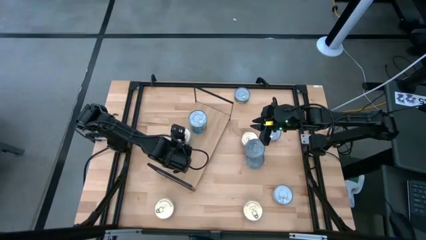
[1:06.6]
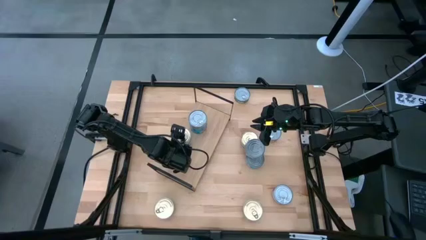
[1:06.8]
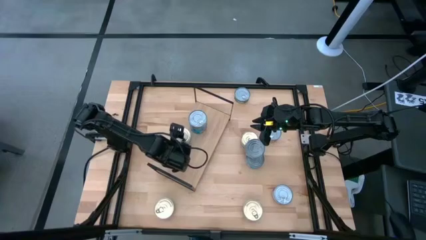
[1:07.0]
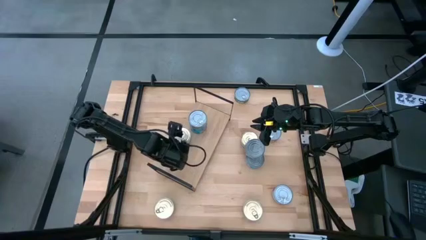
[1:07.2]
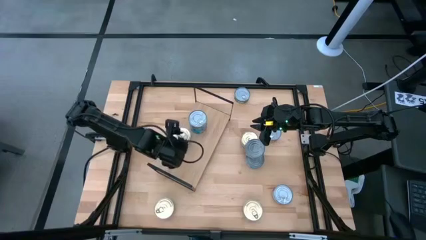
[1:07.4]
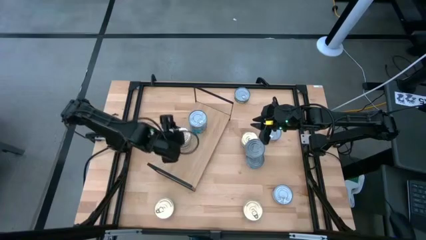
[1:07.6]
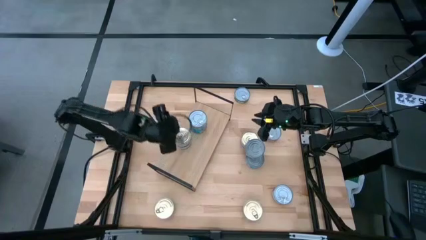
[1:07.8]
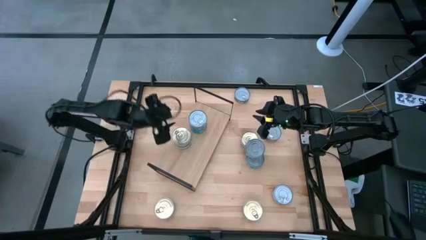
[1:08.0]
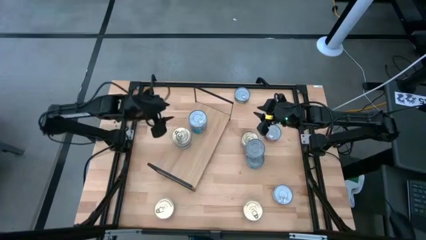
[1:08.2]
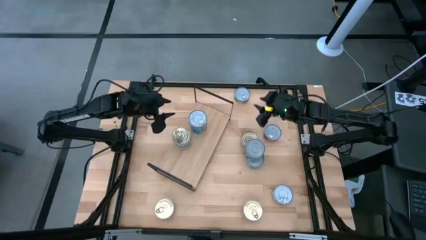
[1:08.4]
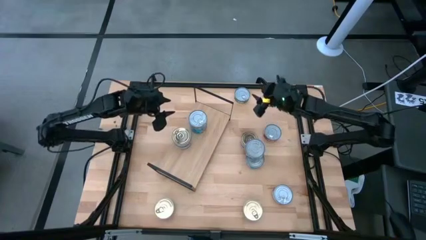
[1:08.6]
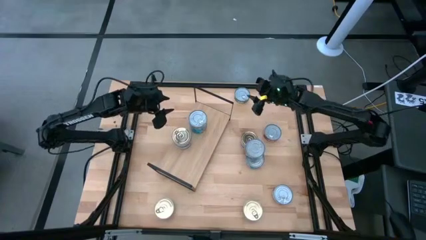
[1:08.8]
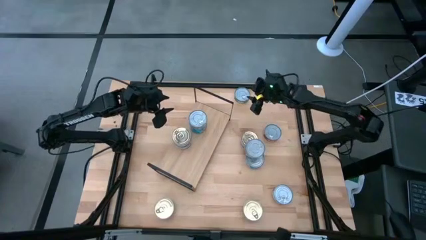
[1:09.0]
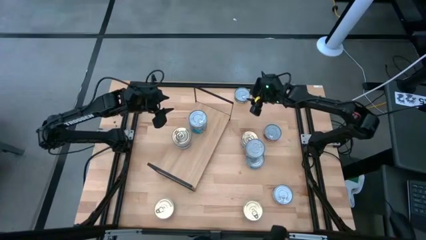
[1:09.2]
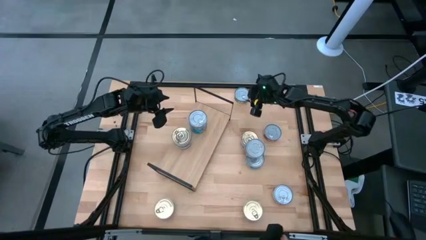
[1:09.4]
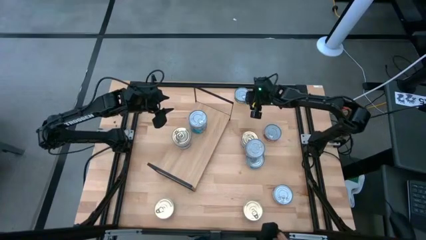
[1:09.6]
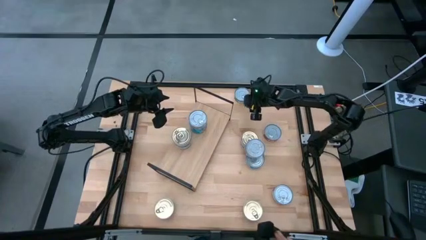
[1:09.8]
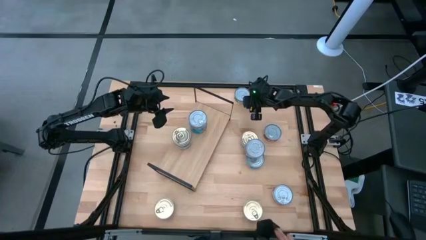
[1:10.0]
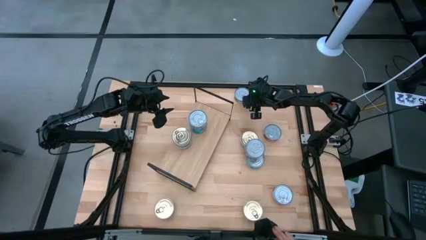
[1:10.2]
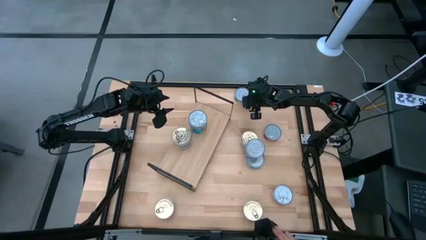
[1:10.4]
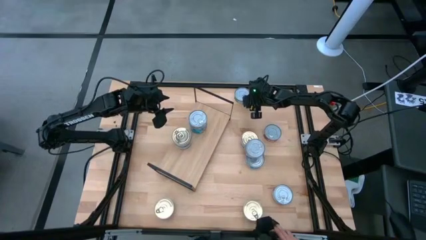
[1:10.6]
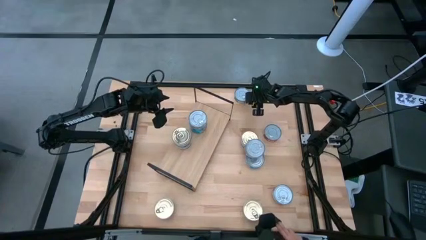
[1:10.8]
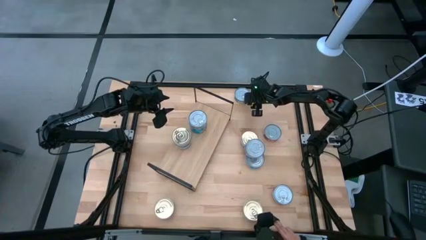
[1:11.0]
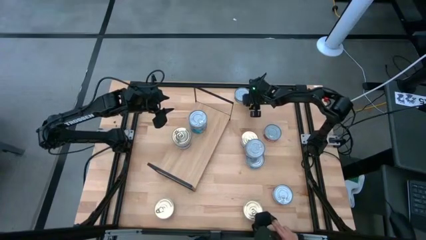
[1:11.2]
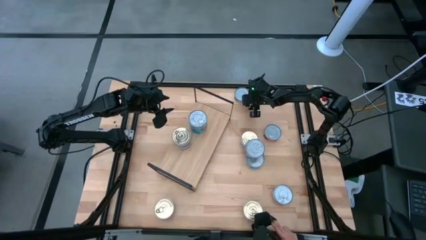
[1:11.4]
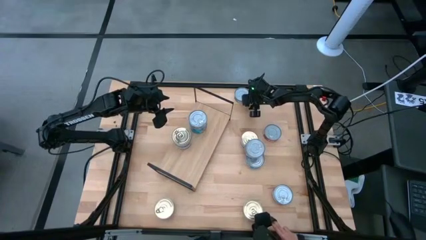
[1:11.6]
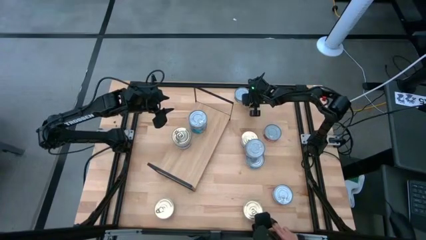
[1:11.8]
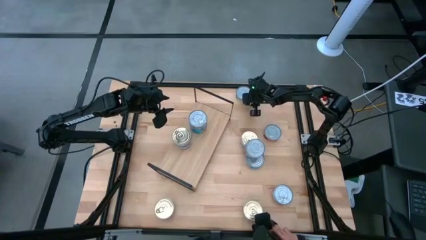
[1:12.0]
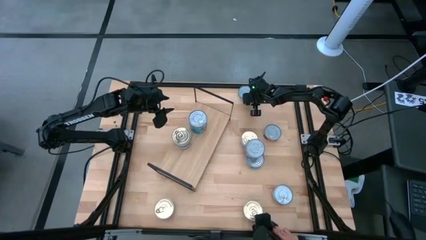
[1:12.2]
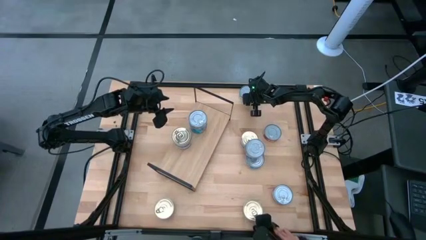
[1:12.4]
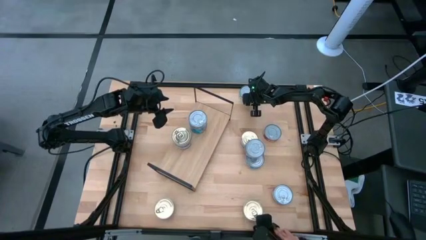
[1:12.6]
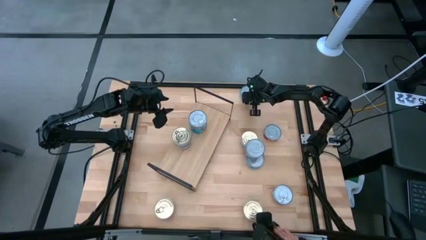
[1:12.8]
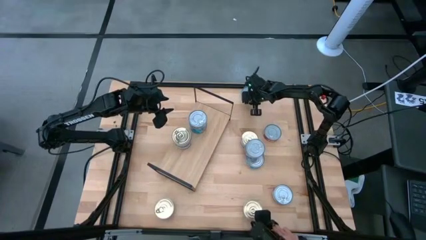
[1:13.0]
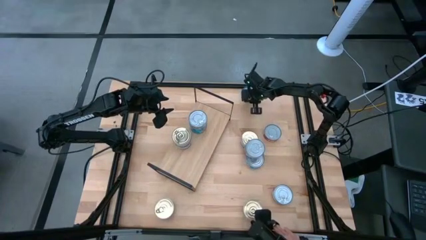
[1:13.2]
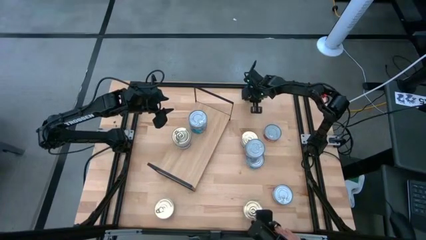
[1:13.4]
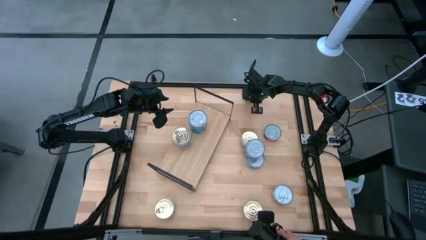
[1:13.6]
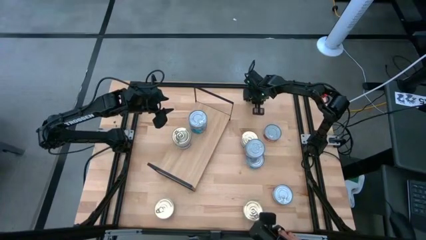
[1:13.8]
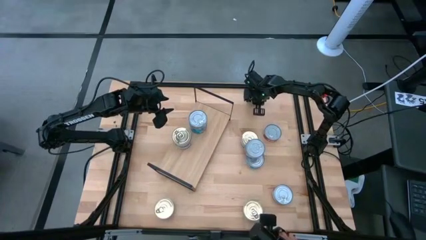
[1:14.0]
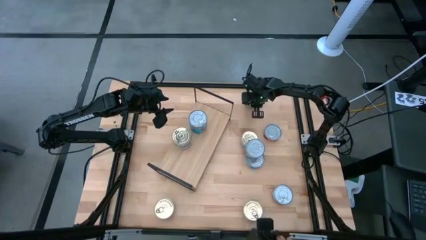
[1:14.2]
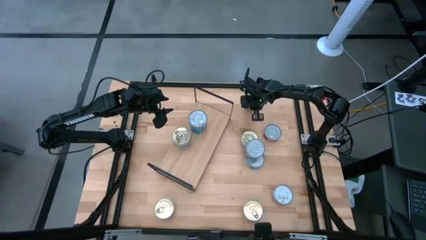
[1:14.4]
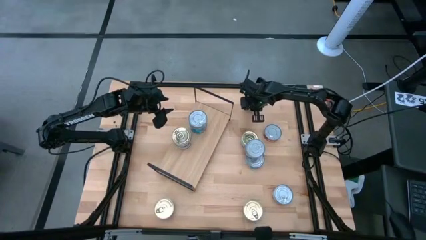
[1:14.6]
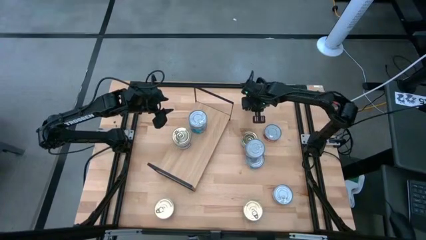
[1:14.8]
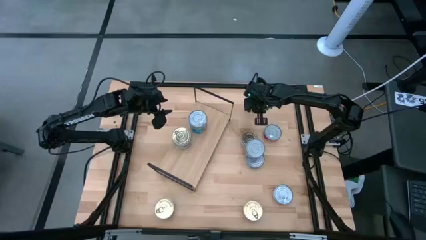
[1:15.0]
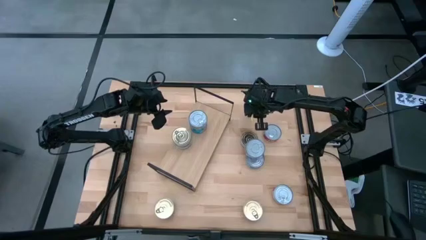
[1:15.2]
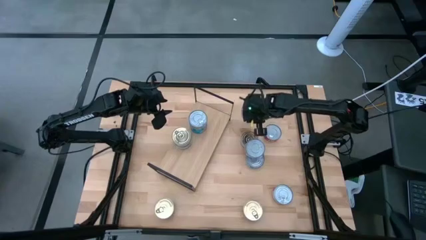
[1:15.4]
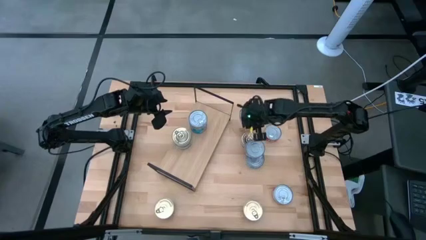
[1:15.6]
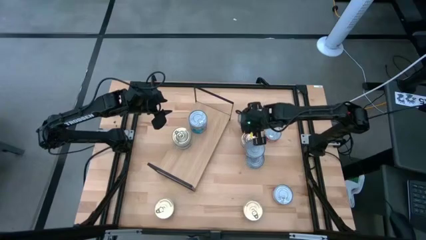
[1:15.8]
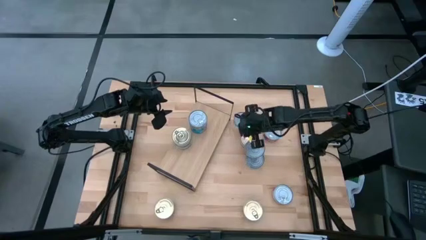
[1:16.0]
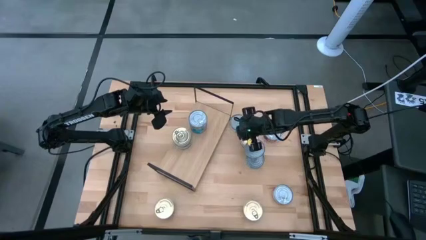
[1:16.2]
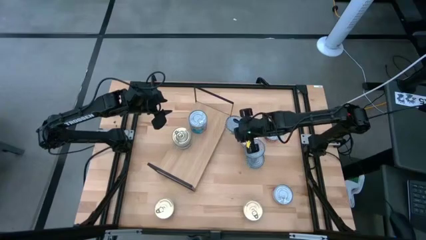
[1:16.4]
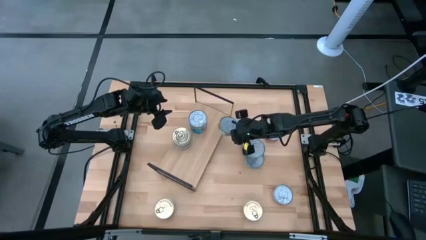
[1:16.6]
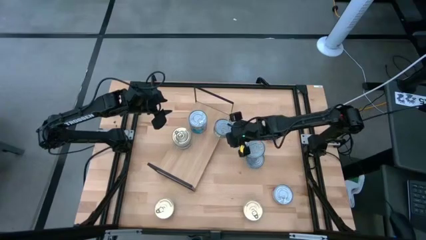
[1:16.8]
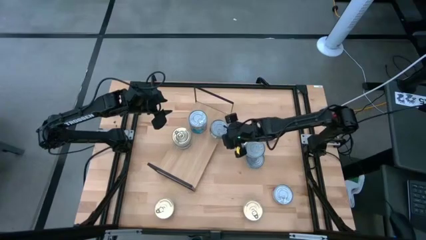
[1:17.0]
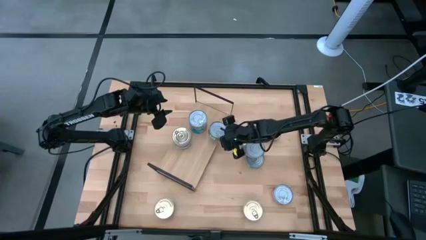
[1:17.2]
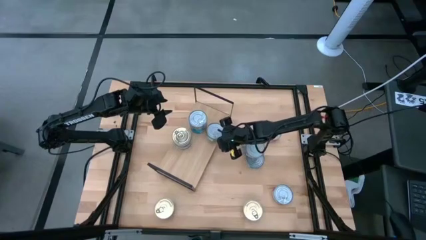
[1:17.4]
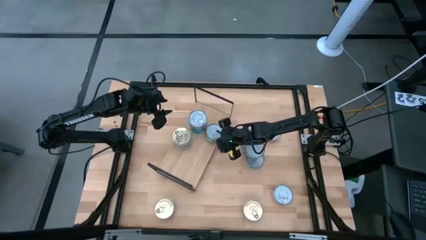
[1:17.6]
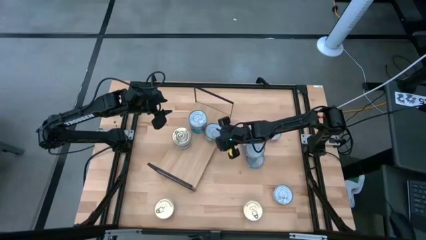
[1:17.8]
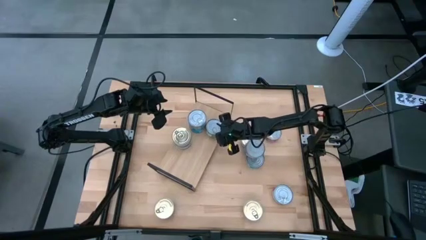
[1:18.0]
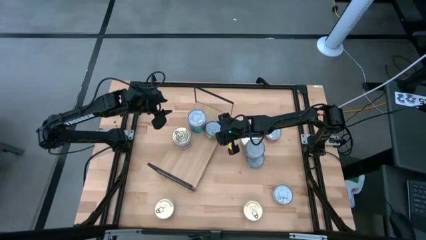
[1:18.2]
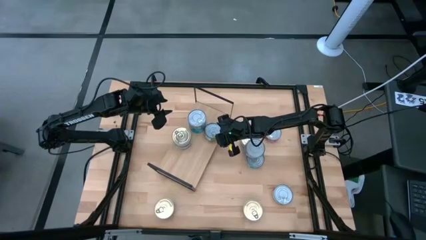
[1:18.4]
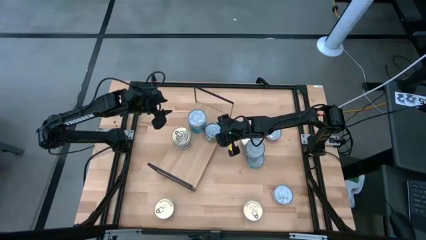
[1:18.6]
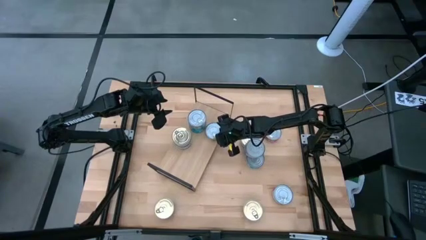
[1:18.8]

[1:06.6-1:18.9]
Task: Stack canned seafood by type on shelf
Put the top green tuna can on the shelf

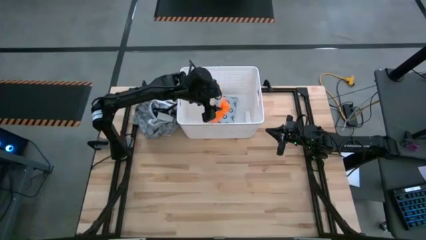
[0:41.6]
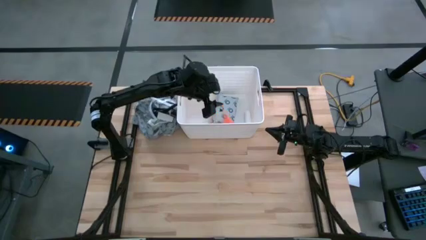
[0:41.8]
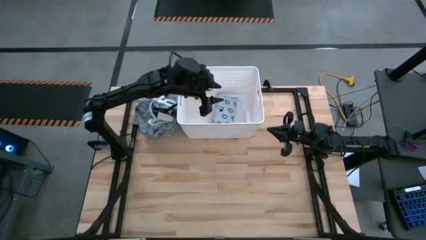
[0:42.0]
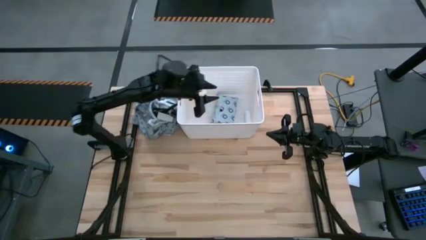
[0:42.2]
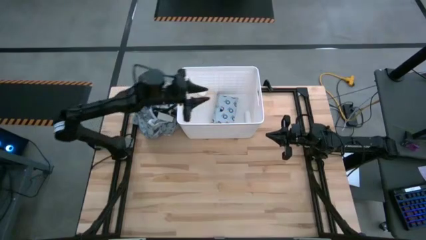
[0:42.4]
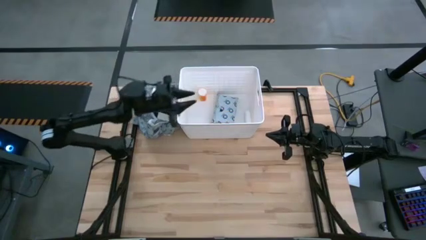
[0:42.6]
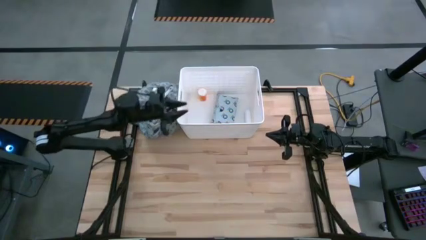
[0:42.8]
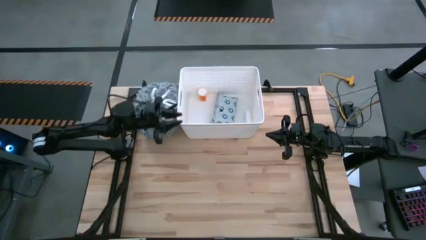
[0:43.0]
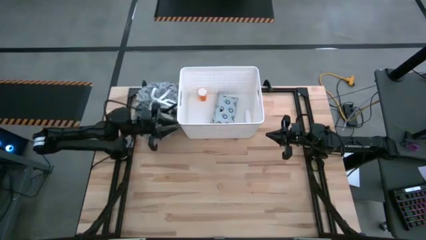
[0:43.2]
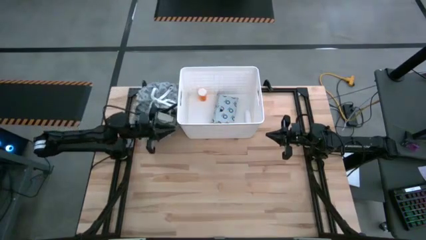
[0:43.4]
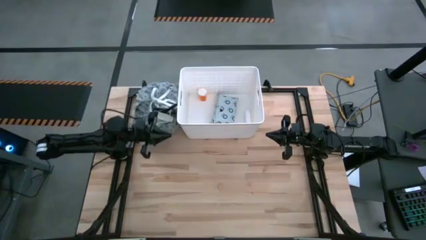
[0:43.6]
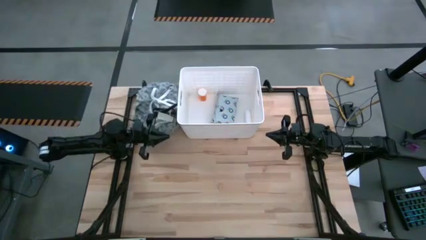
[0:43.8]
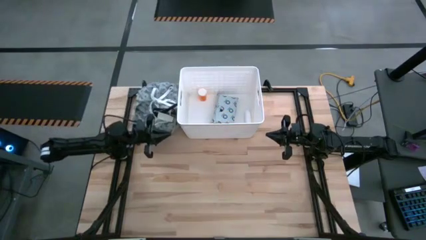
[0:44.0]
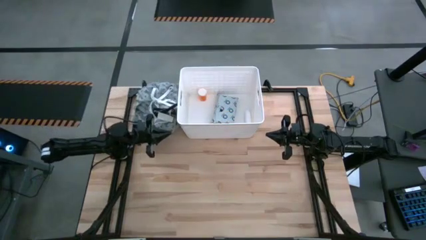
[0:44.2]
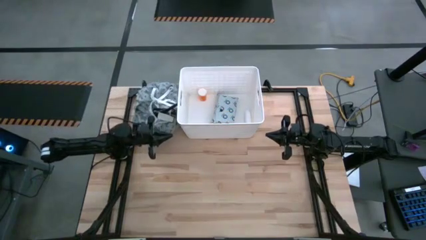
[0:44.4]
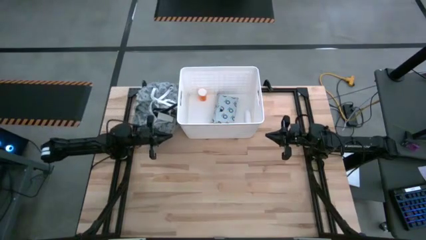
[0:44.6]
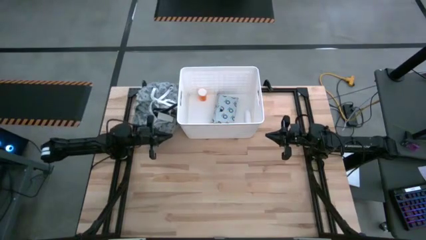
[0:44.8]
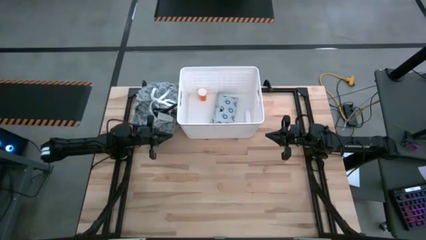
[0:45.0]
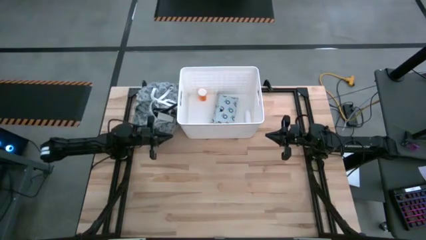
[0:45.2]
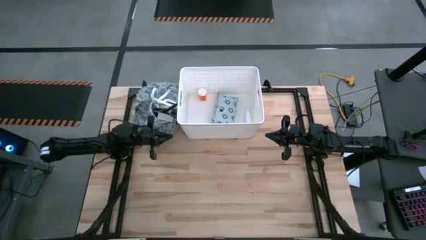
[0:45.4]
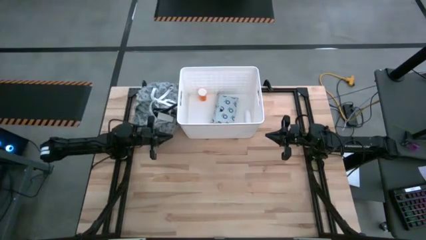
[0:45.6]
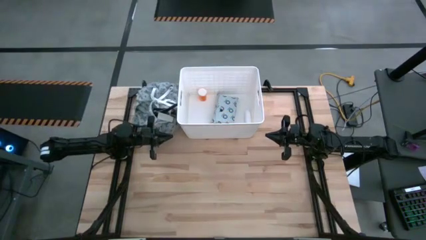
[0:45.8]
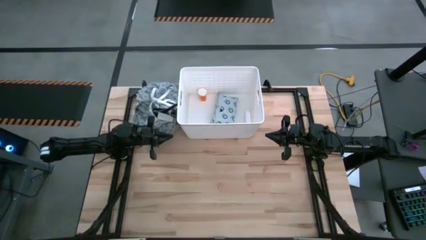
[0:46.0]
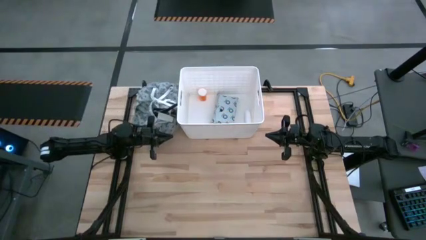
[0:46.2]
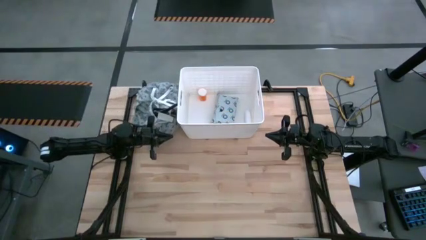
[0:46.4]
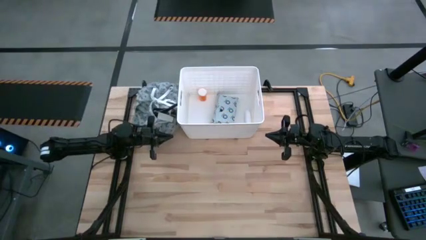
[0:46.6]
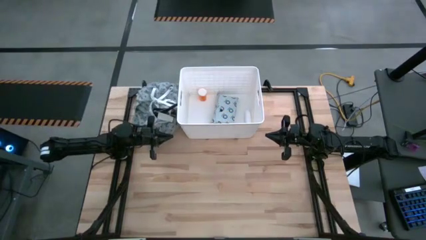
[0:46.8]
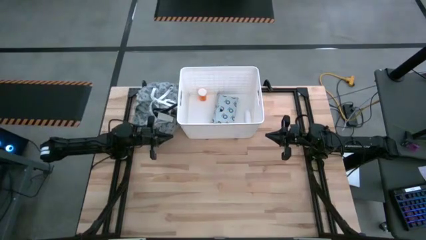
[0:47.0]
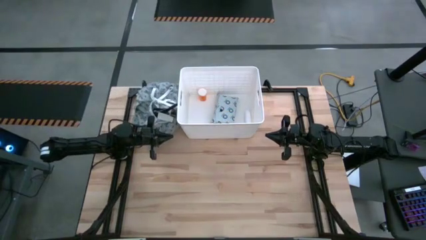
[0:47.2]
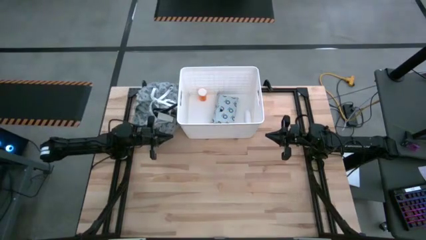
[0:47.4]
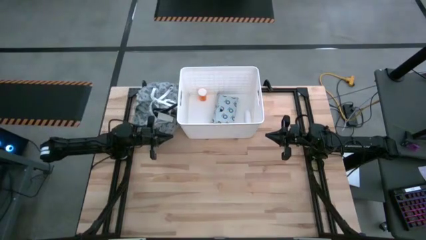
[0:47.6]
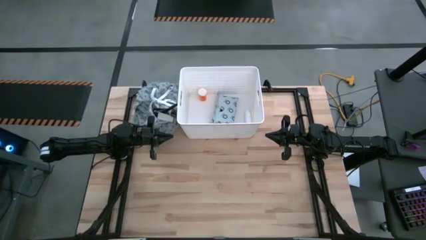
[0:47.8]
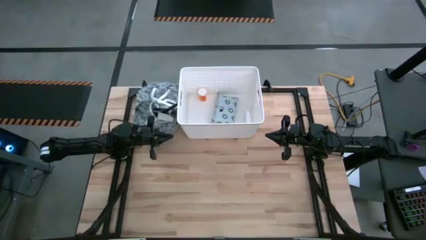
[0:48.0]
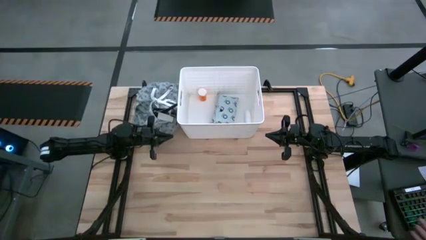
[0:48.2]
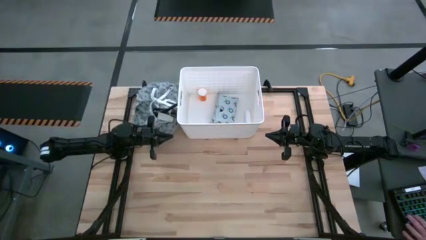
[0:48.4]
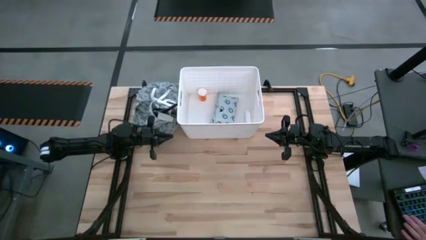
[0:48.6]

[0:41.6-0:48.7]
Task: Pick & place medical supplies in basket/bin
Return to Home Position
